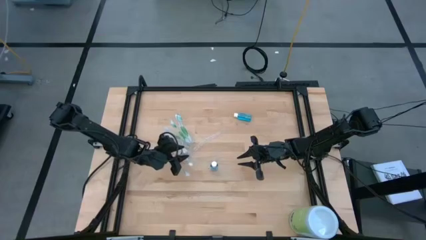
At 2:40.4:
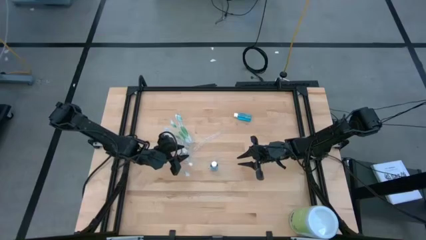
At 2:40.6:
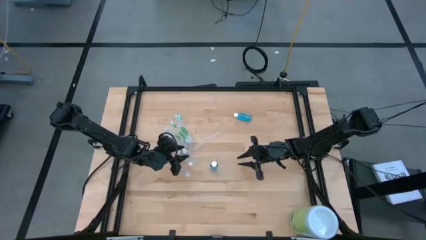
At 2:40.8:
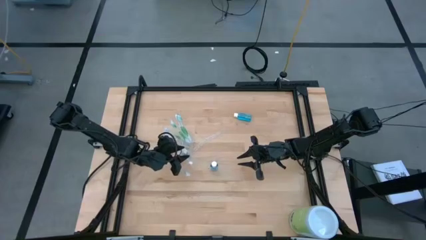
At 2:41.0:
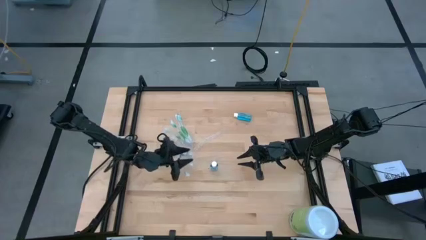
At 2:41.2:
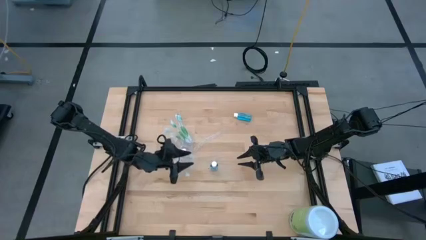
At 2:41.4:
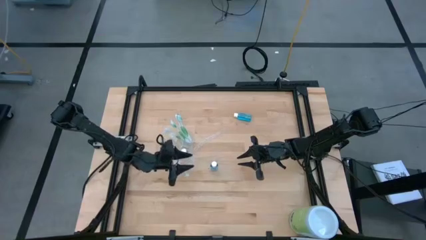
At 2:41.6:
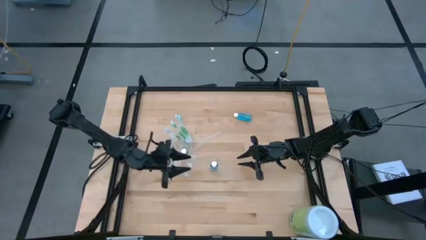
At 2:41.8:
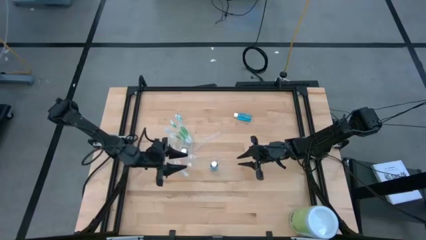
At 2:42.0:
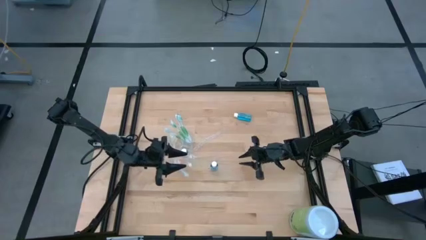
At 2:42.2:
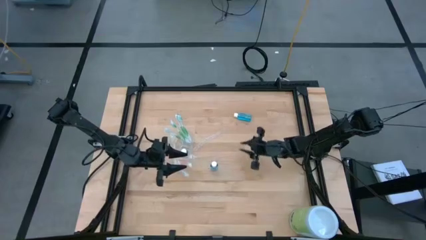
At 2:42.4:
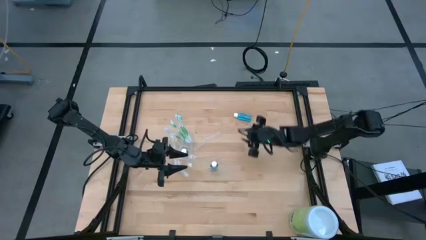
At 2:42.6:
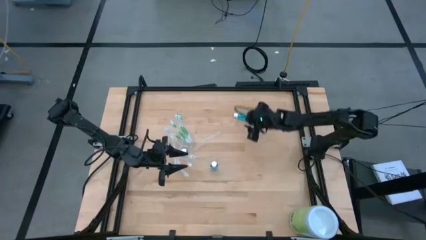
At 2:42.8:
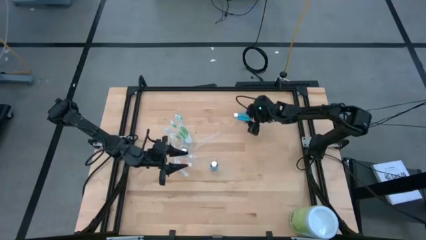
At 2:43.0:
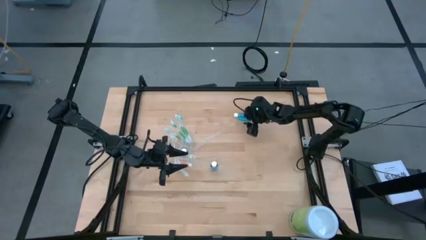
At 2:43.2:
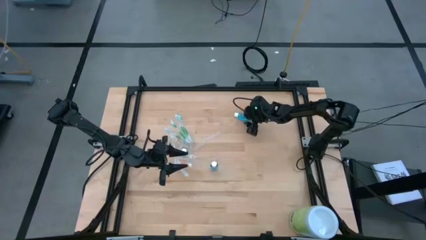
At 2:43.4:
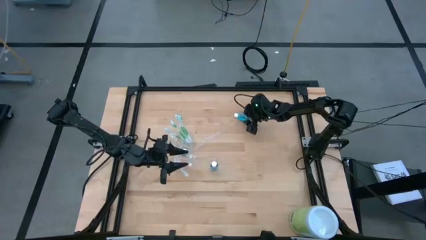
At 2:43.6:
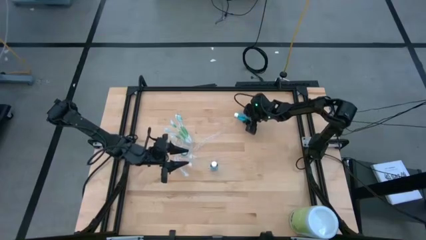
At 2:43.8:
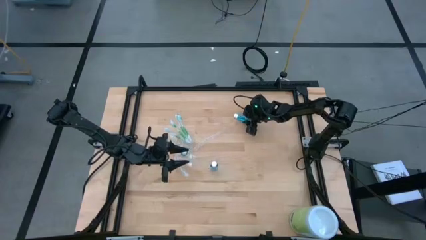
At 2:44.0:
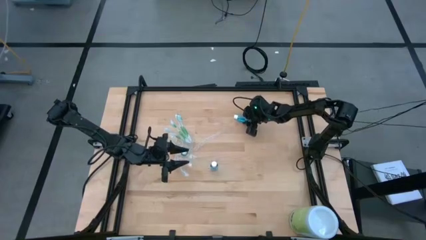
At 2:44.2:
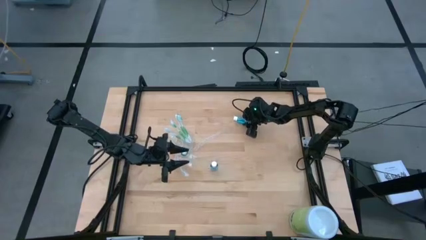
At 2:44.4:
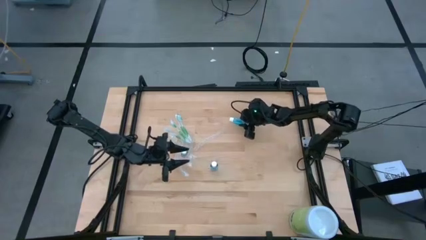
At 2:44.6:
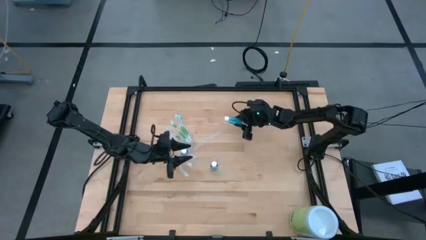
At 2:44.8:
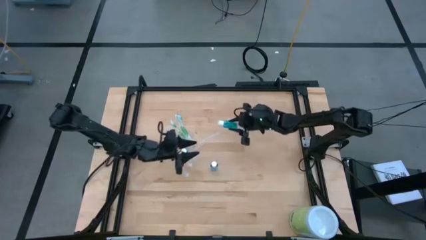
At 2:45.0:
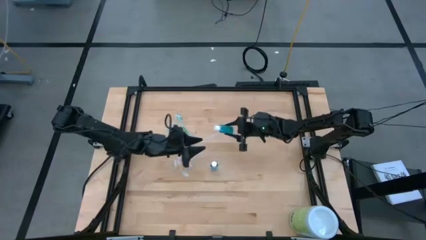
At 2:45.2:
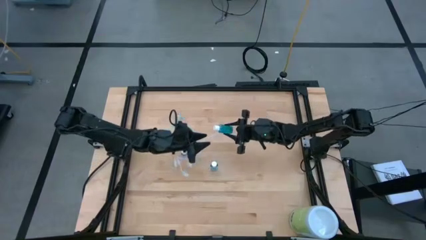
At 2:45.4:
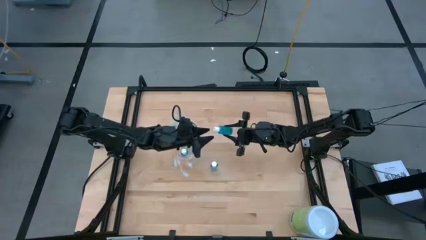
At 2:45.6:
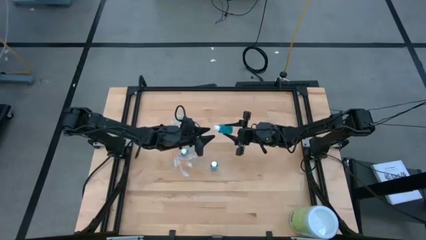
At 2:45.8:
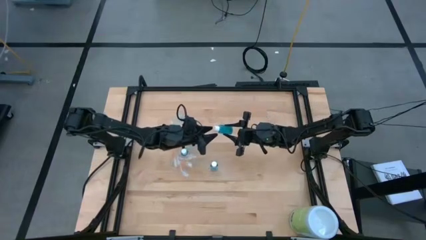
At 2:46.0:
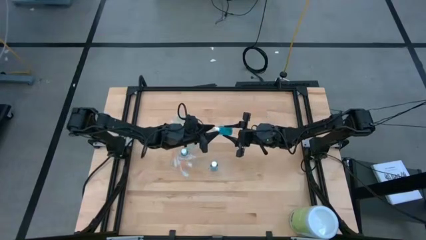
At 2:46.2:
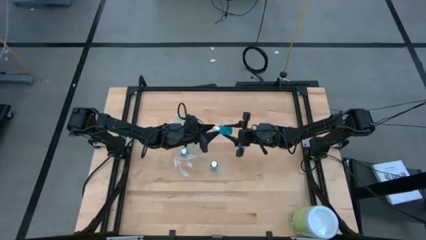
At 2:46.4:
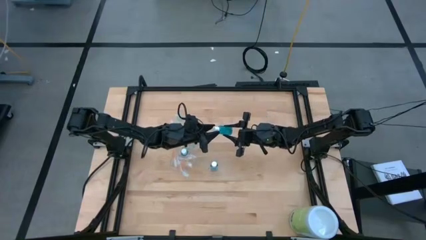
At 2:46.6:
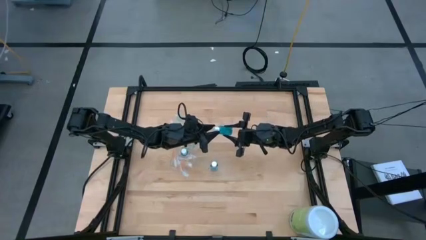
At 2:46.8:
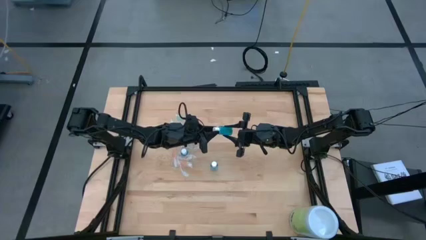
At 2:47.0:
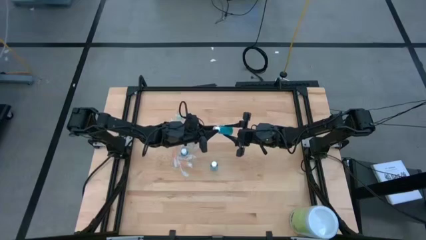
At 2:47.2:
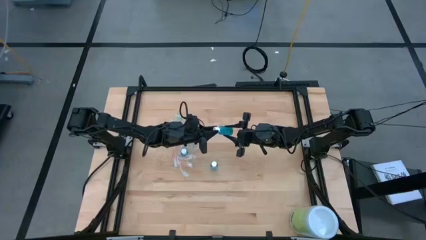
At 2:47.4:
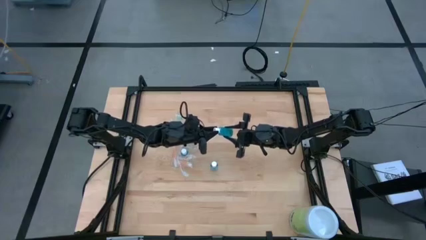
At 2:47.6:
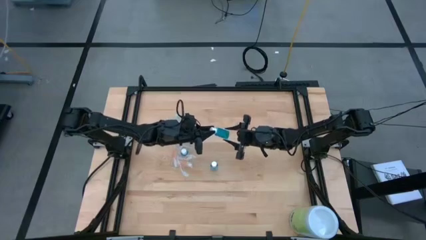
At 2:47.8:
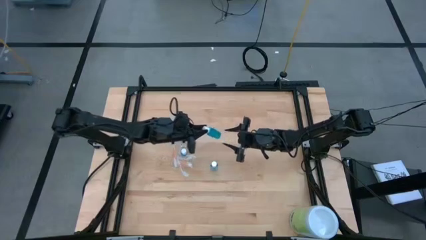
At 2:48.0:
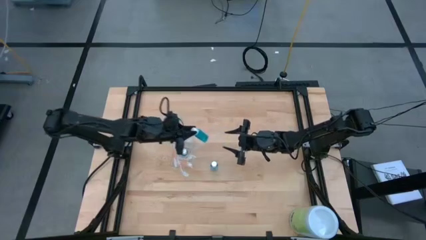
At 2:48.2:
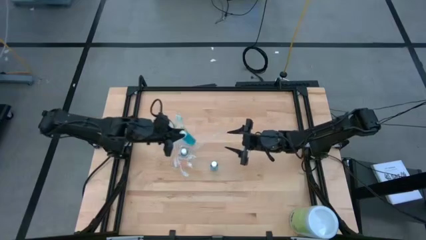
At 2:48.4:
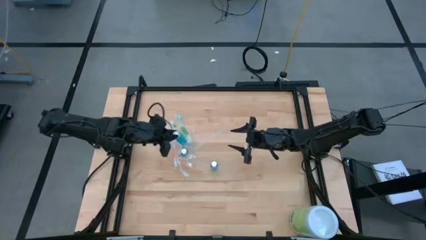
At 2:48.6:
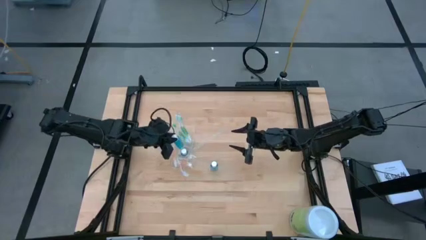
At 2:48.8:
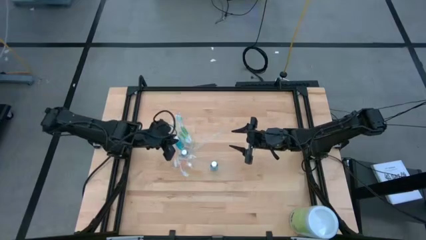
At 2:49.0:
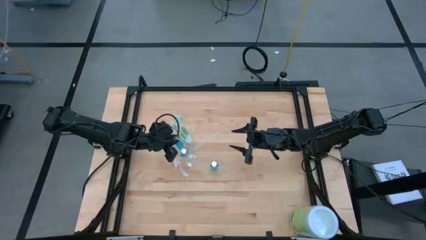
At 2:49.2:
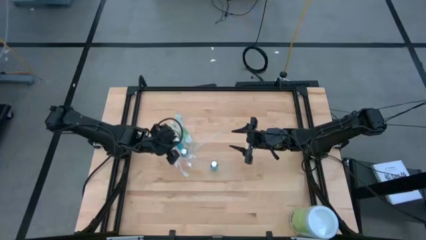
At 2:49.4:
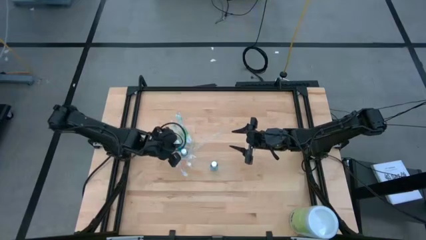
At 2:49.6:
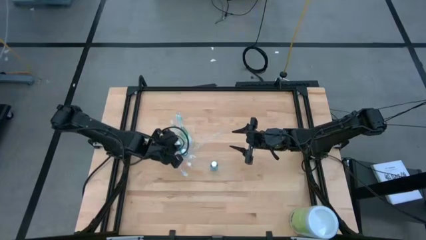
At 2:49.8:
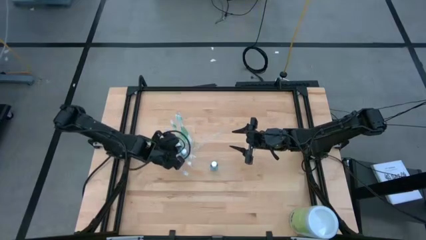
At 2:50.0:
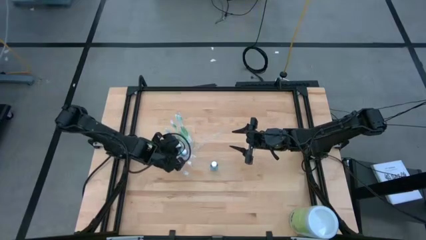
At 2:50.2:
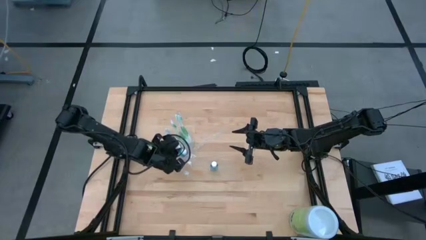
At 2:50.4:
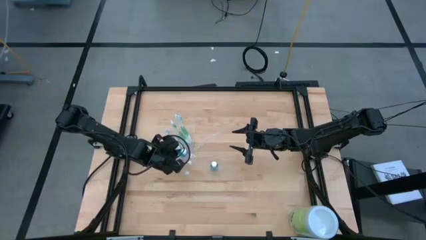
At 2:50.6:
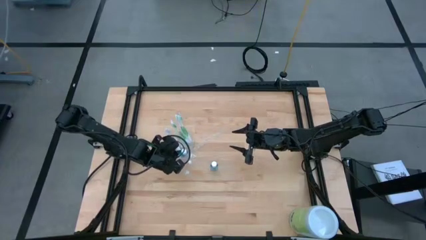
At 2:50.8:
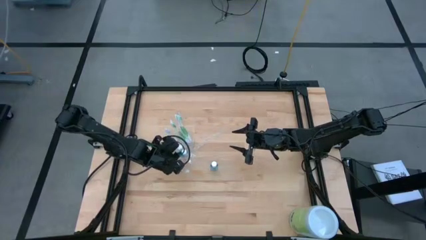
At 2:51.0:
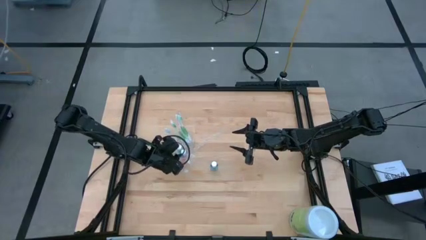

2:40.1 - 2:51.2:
Task: Pick & Place toothbrushing station
Put the blue mouthwash into the middle section of the transparent organizer

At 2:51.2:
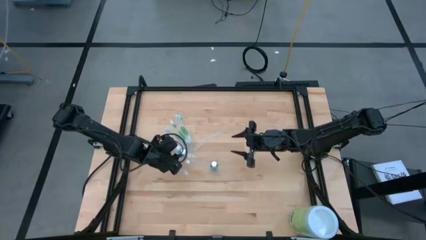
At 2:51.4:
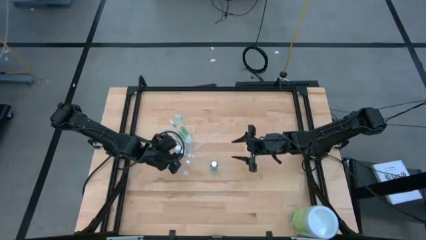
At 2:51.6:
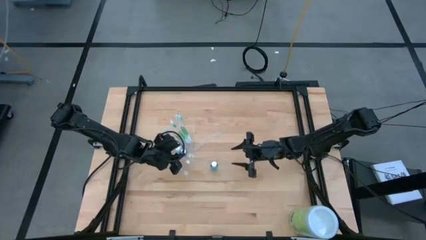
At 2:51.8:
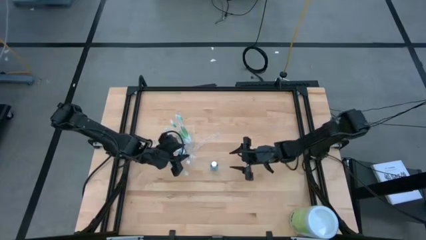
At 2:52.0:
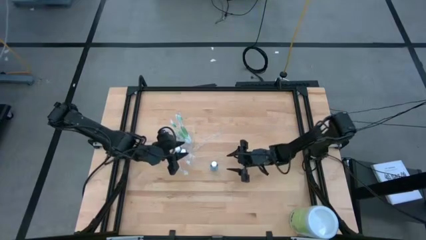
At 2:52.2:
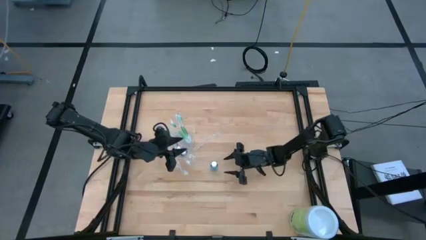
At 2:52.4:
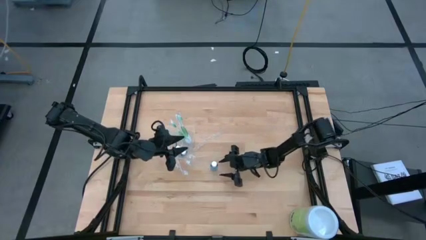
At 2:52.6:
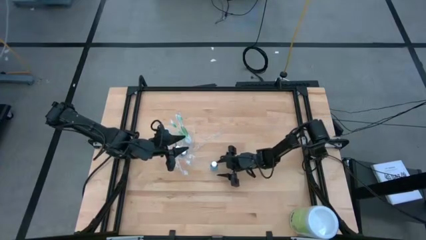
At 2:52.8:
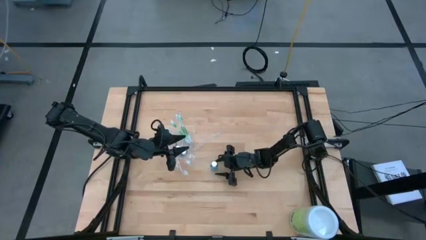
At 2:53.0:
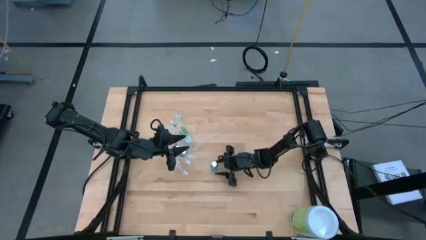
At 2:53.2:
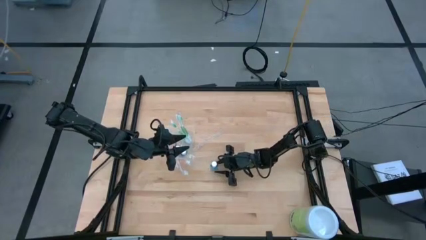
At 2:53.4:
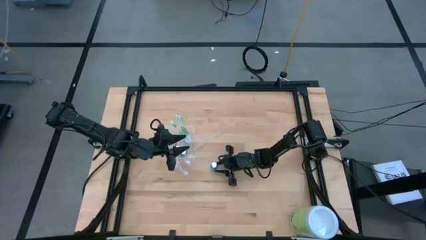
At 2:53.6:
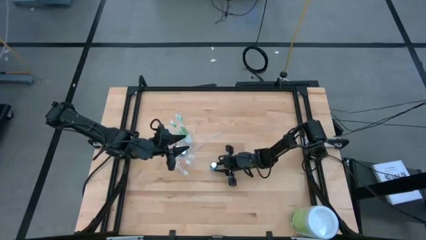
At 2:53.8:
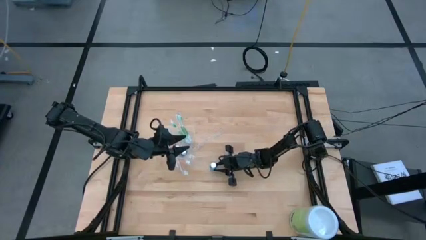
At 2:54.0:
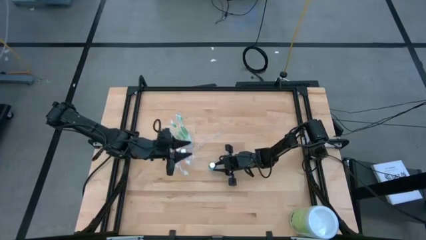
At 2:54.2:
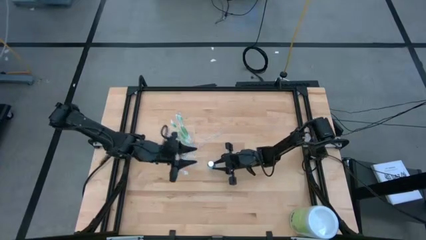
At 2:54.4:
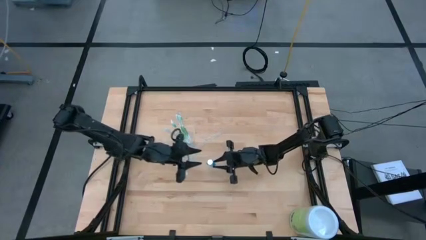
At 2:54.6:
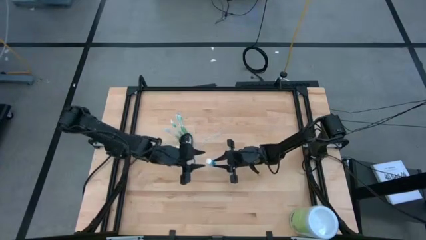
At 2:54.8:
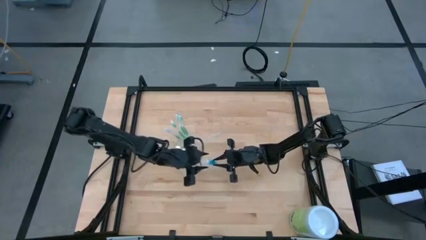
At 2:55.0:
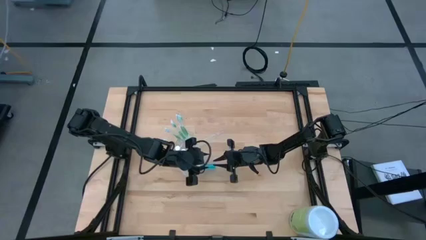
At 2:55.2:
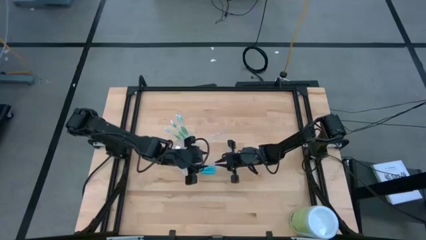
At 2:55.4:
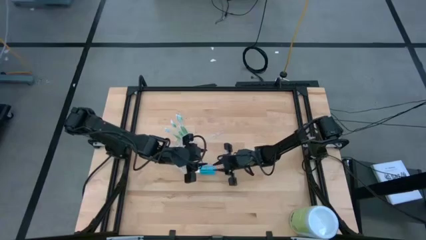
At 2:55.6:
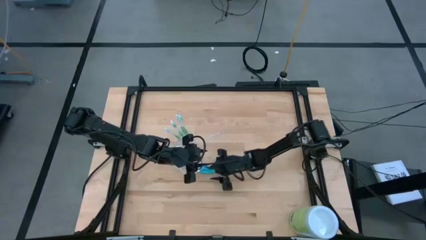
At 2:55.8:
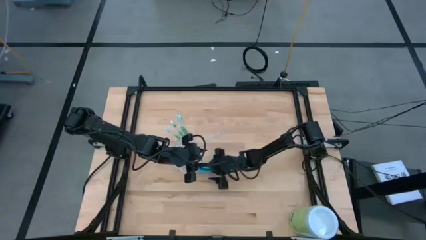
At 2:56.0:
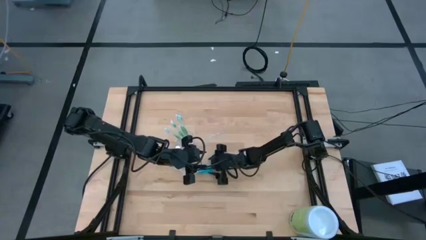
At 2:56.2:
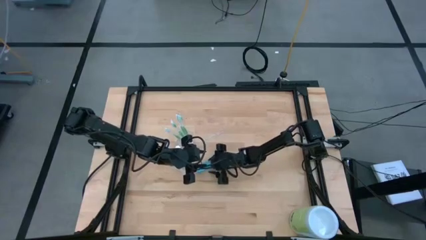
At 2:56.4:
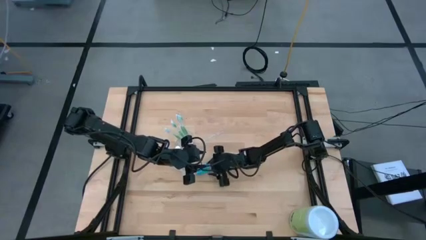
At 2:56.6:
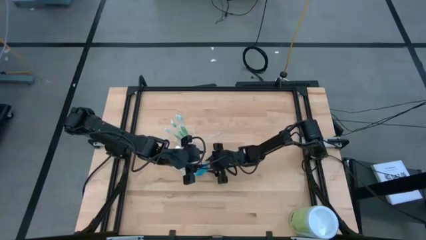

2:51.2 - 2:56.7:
Put the blue mouthwash into the middle section of the transparent organizer
